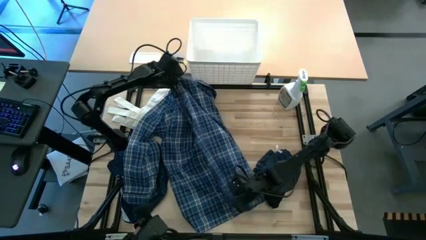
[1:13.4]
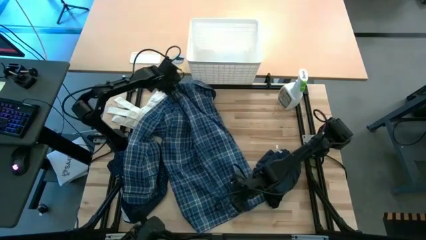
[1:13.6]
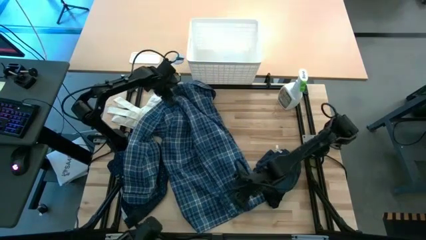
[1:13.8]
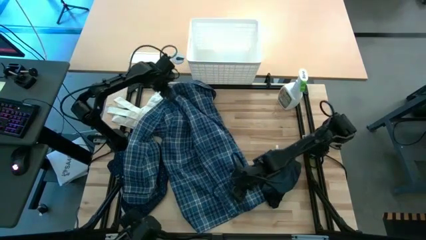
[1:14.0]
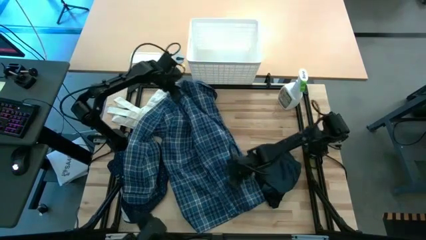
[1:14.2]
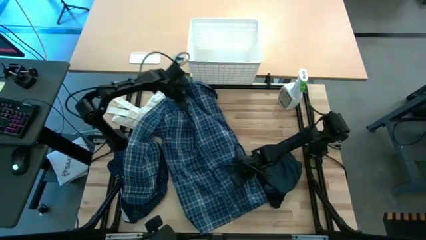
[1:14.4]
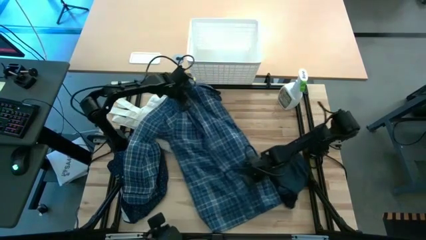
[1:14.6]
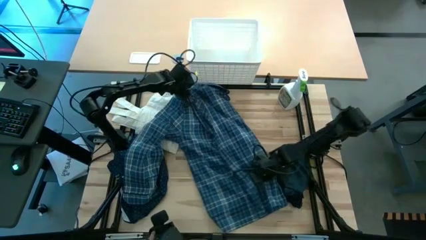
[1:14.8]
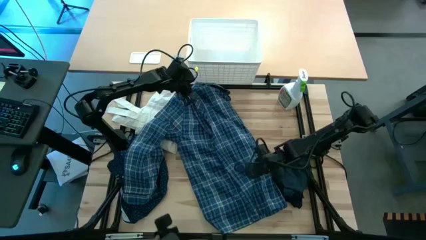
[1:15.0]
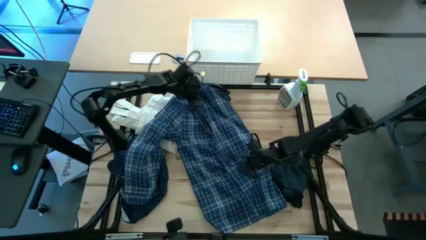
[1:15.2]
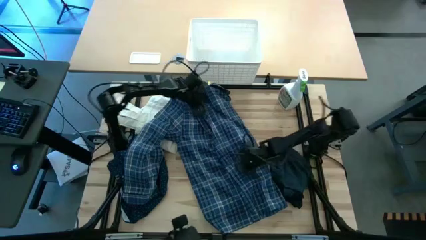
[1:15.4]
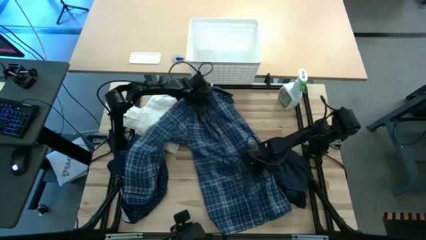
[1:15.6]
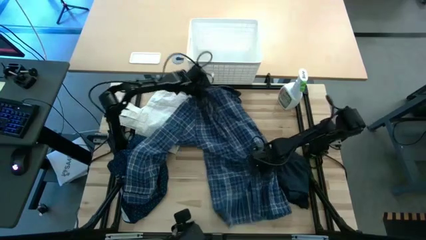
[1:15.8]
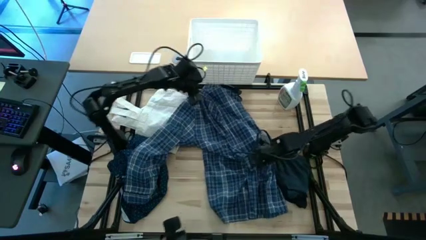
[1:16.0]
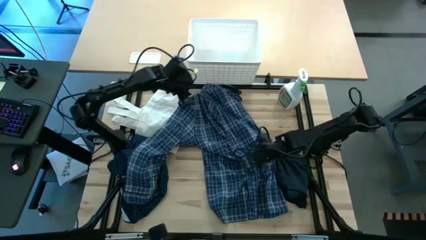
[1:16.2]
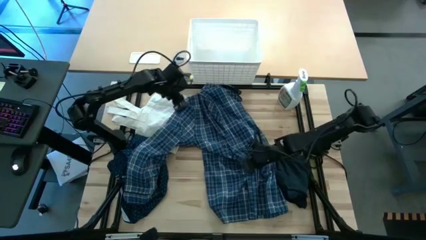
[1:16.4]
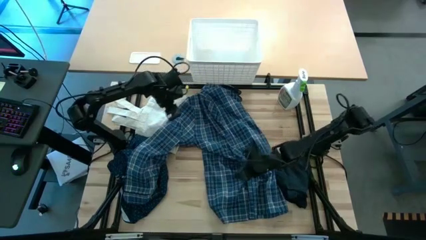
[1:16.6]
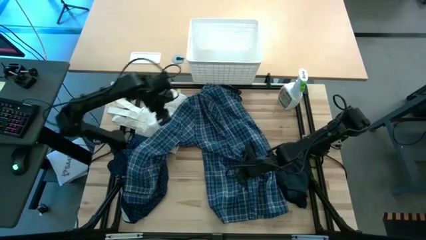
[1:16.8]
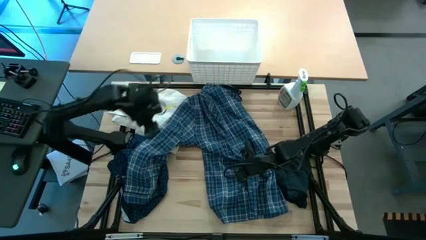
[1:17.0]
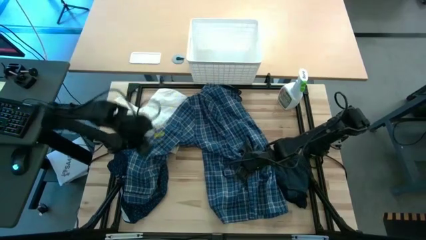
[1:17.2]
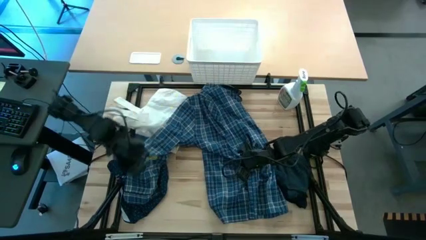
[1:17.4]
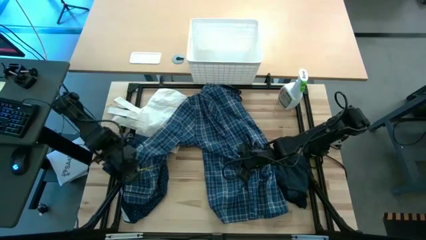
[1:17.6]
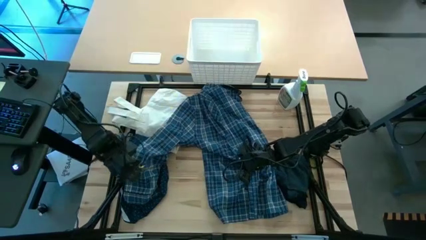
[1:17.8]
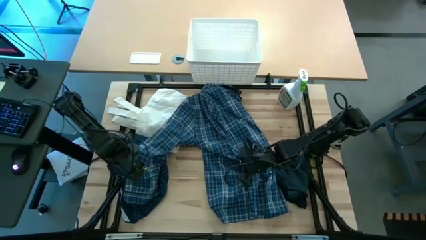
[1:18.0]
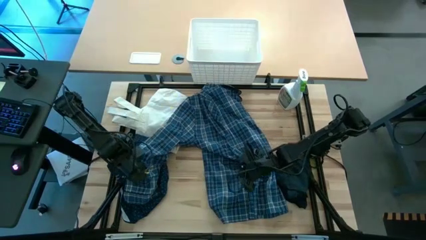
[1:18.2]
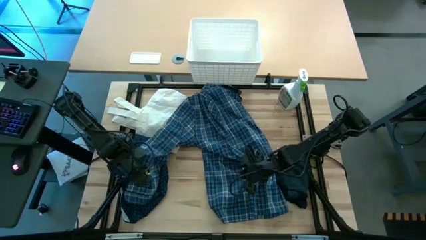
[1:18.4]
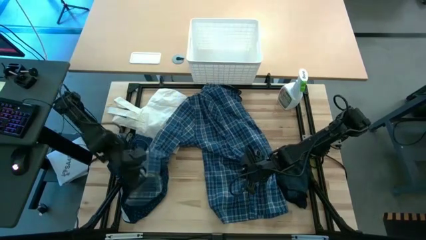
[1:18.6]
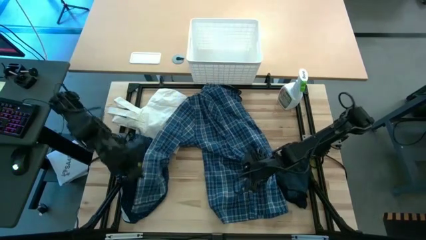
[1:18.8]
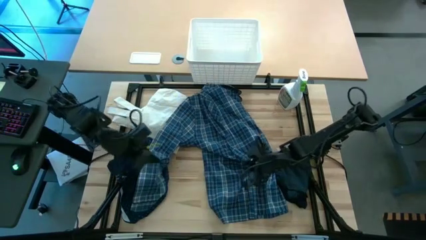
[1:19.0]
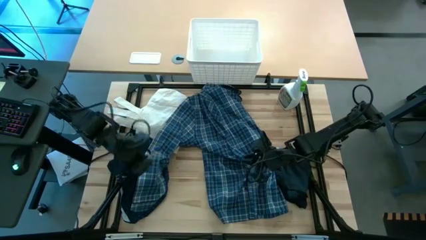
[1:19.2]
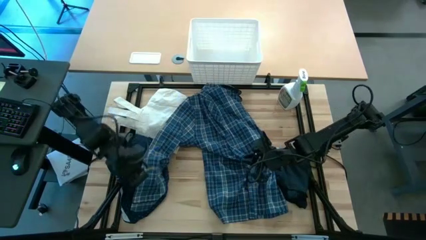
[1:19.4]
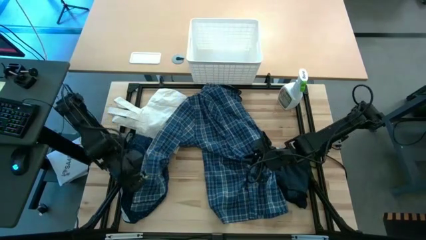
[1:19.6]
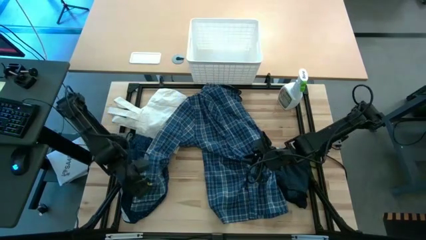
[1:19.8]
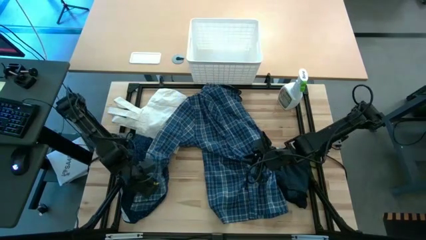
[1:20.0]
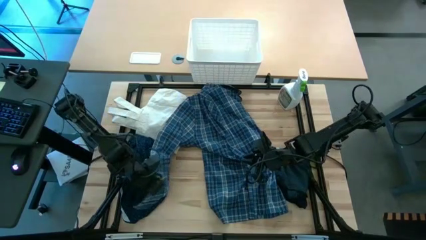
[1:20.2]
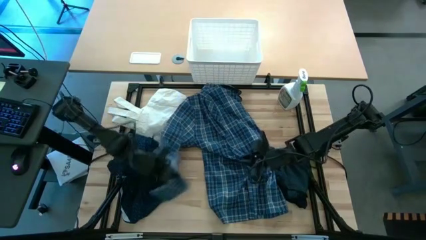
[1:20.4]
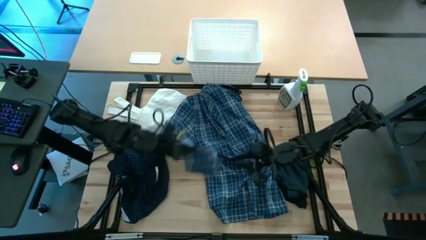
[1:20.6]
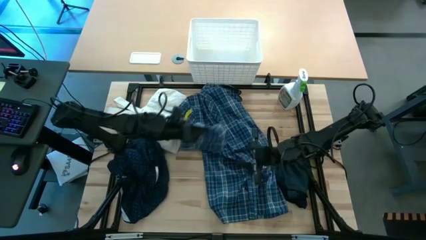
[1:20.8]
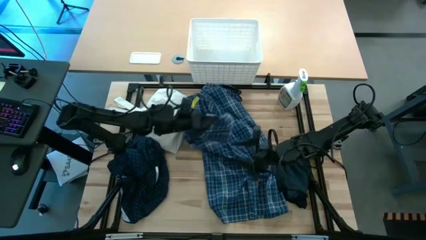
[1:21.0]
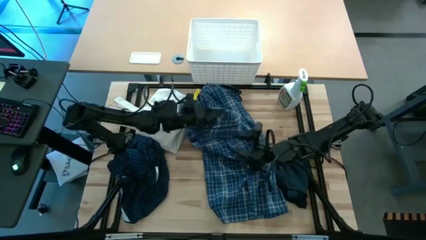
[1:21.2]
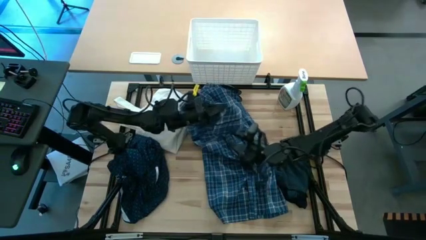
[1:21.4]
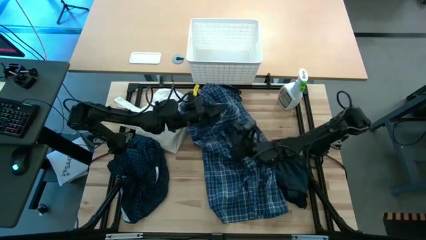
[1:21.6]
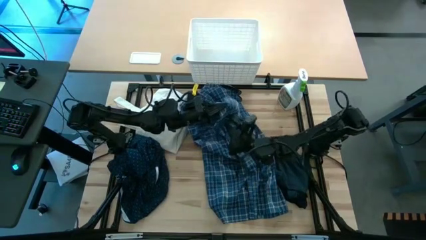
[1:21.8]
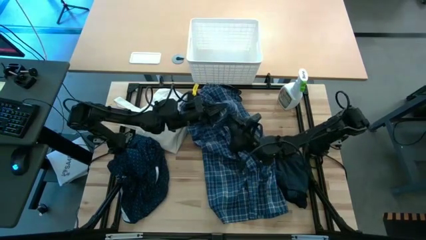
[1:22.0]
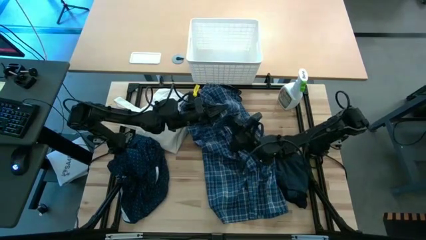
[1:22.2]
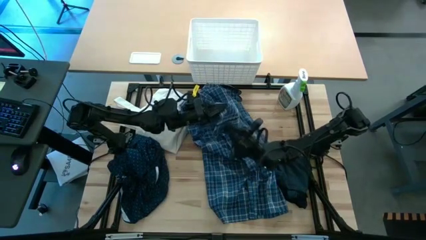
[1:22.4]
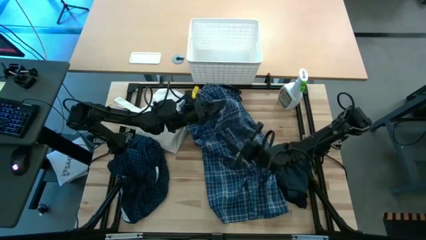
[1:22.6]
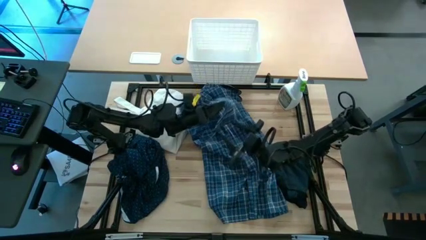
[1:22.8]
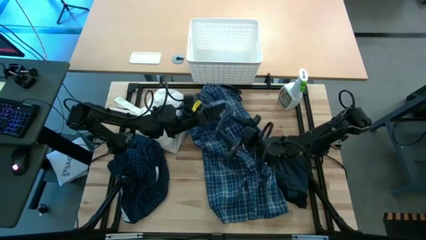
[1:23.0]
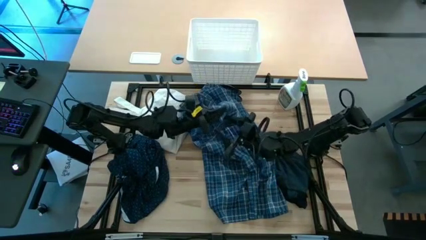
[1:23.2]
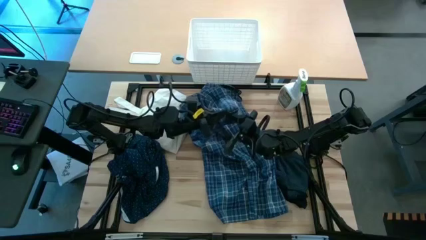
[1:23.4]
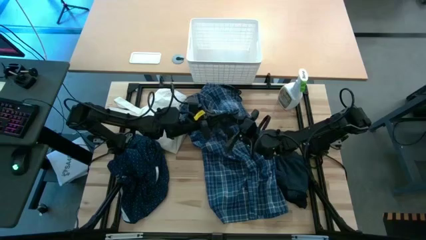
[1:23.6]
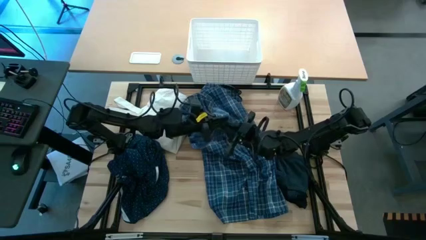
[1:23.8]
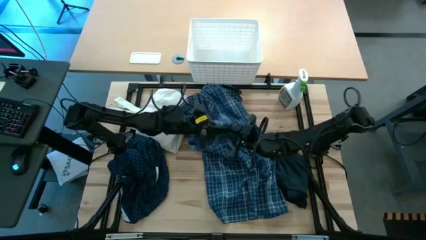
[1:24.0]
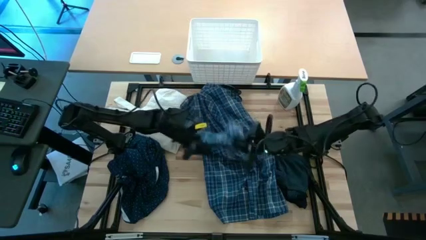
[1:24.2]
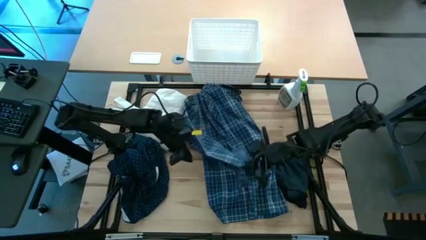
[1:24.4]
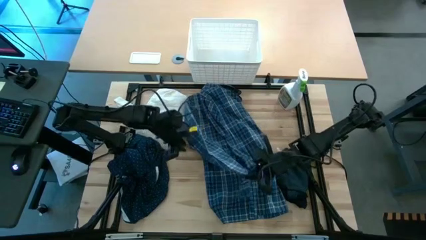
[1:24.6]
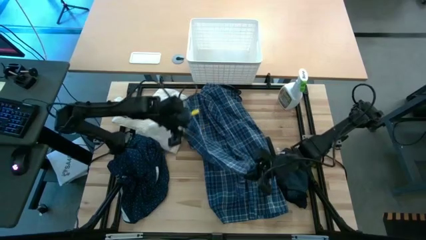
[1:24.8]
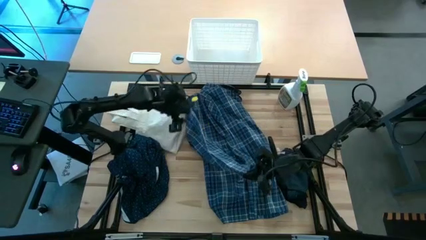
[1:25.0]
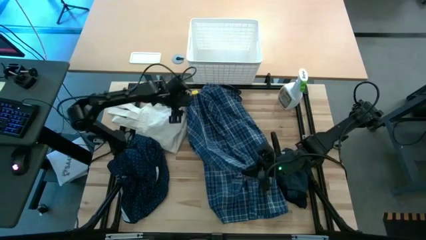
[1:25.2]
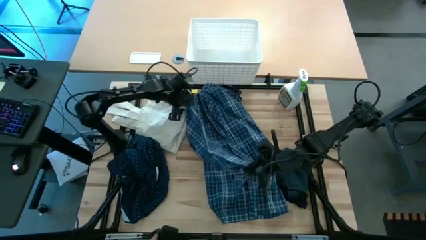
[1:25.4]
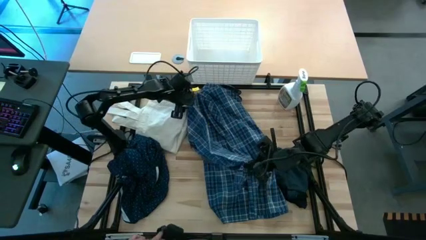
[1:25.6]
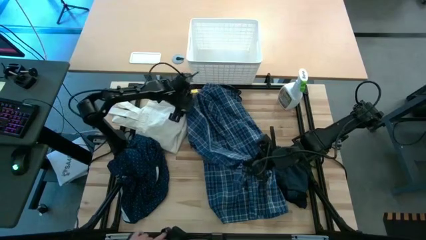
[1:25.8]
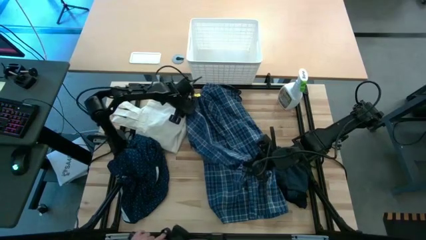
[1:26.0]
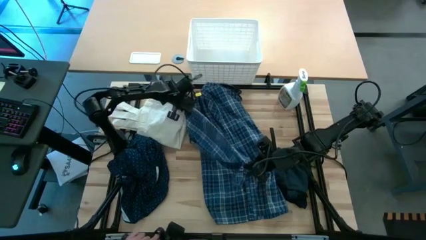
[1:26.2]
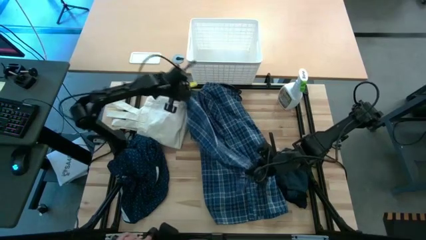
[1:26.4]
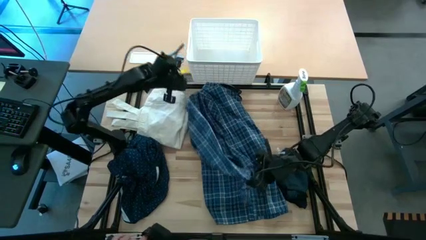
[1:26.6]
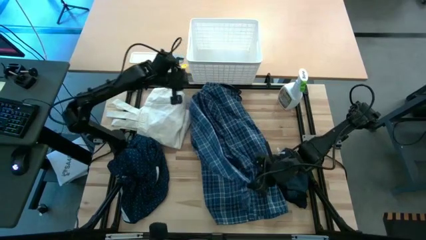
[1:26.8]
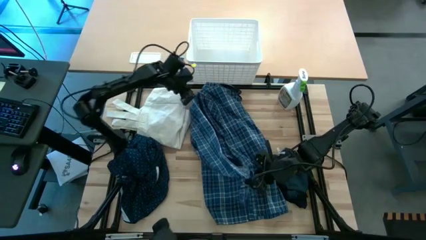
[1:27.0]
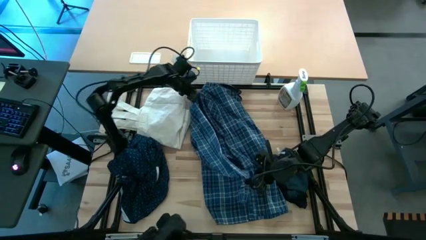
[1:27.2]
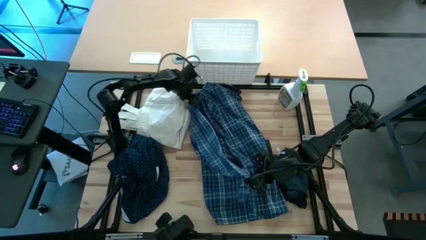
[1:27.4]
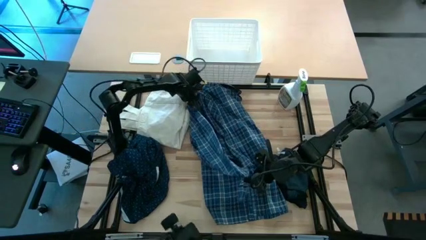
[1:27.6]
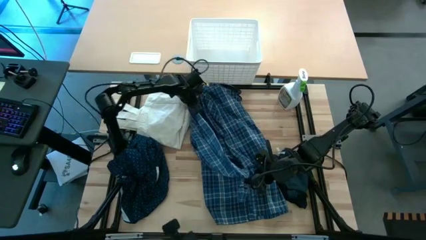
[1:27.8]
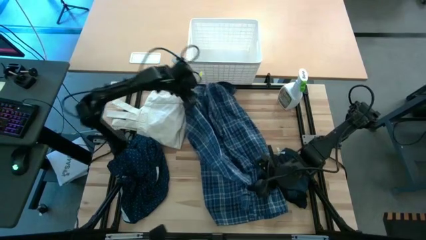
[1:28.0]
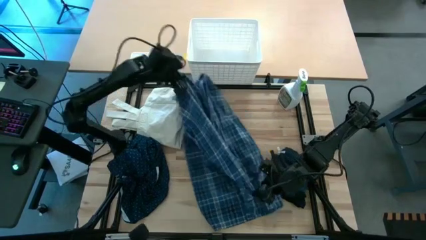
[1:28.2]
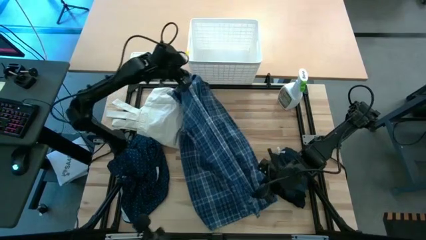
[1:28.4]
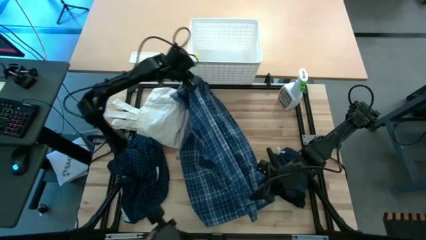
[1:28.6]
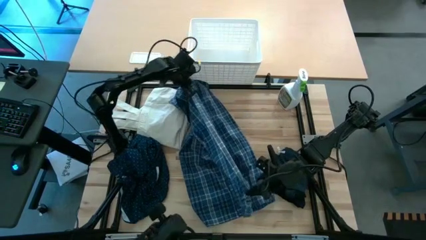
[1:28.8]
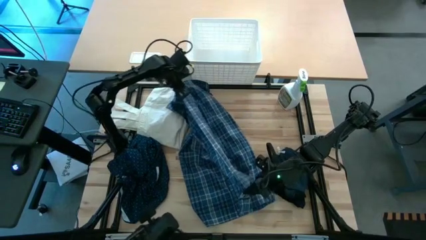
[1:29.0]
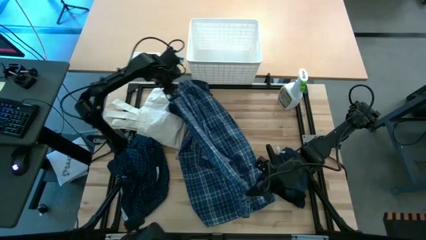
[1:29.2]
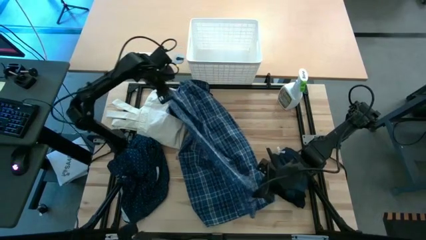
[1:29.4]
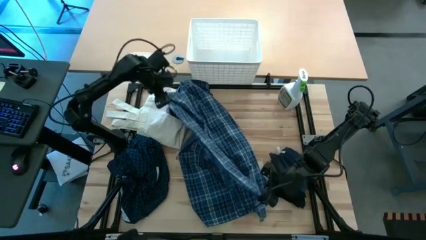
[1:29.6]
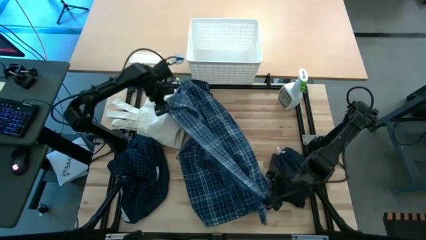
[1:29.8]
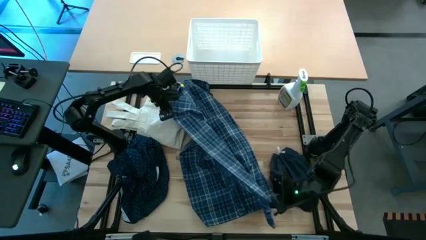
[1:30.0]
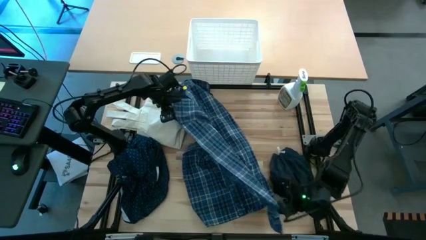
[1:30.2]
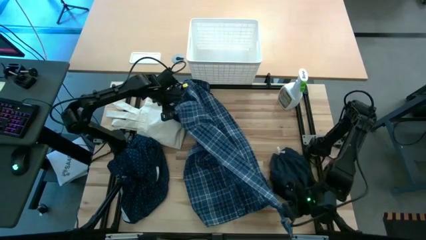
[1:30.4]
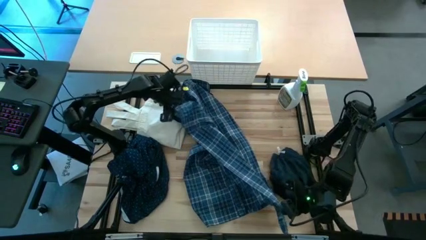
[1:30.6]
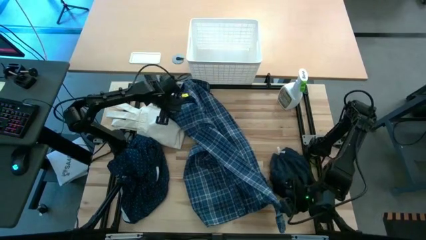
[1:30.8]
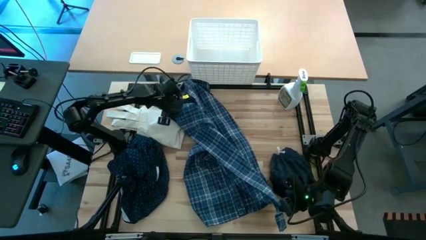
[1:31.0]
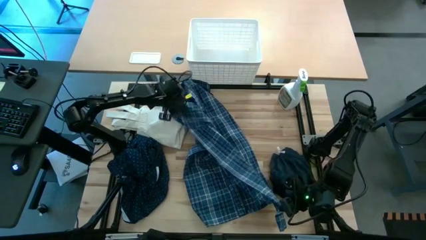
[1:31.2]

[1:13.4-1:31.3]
Fold the blue checkered long sleeve
